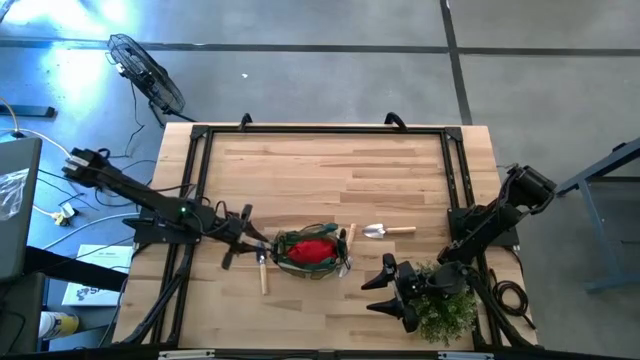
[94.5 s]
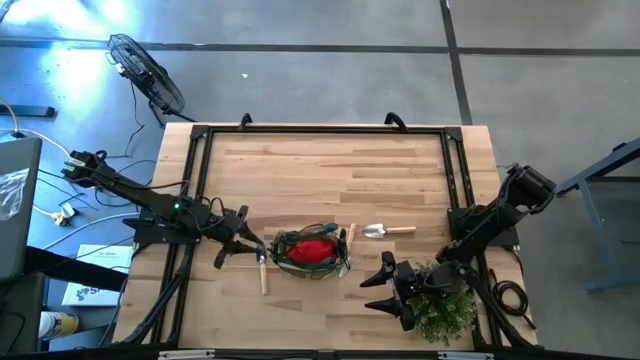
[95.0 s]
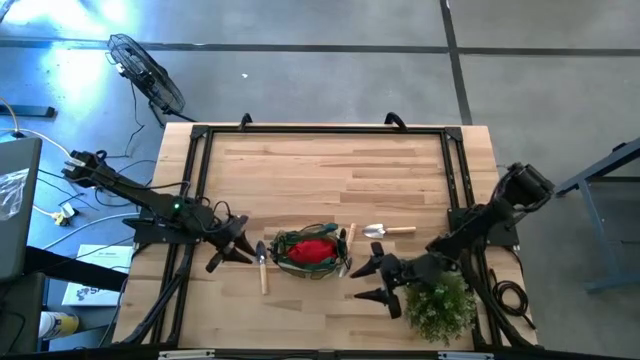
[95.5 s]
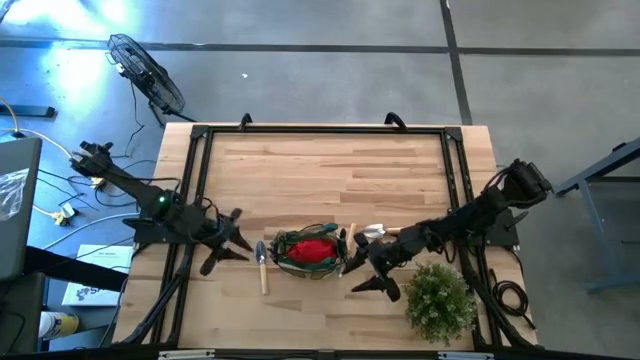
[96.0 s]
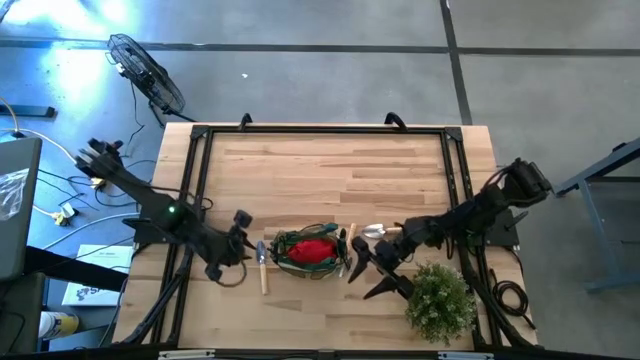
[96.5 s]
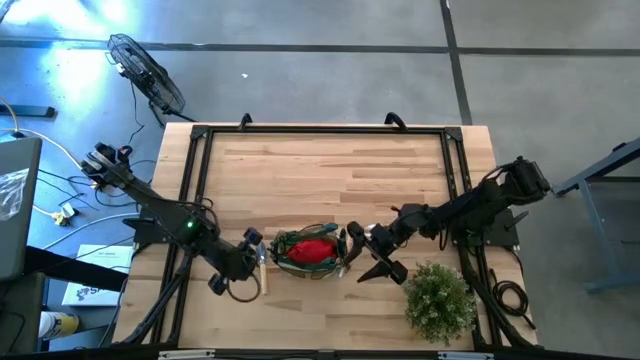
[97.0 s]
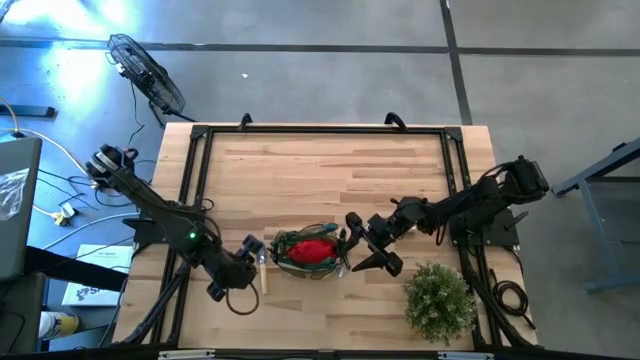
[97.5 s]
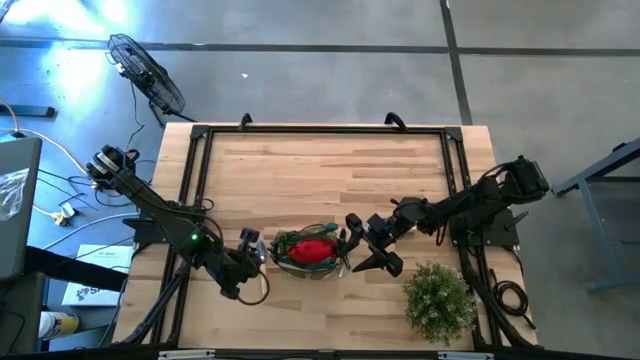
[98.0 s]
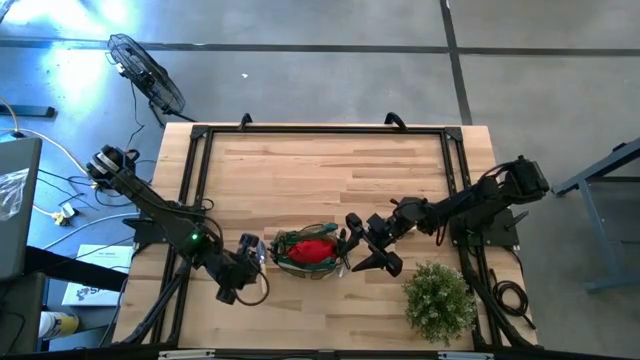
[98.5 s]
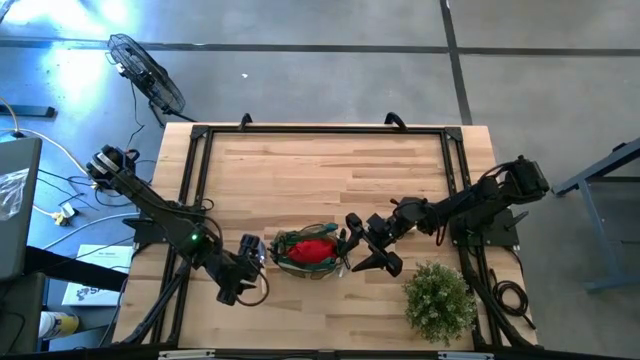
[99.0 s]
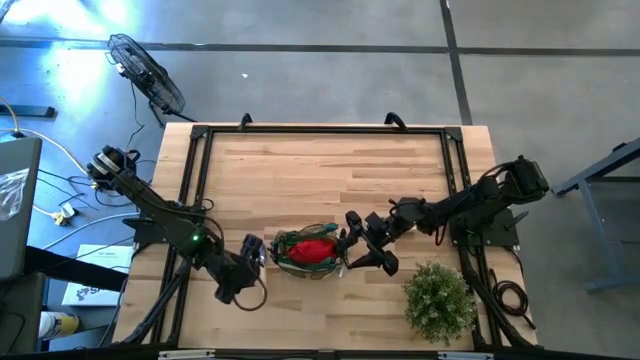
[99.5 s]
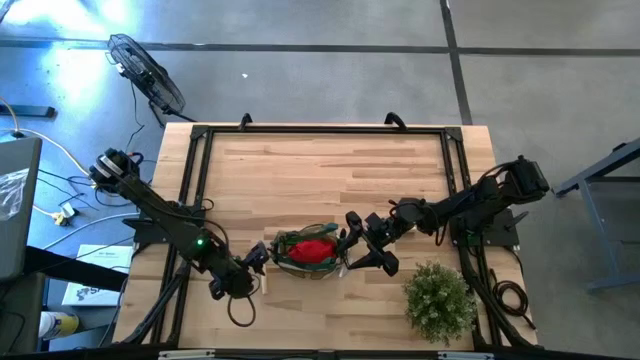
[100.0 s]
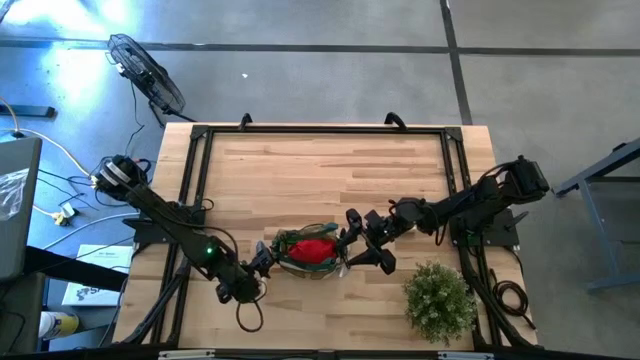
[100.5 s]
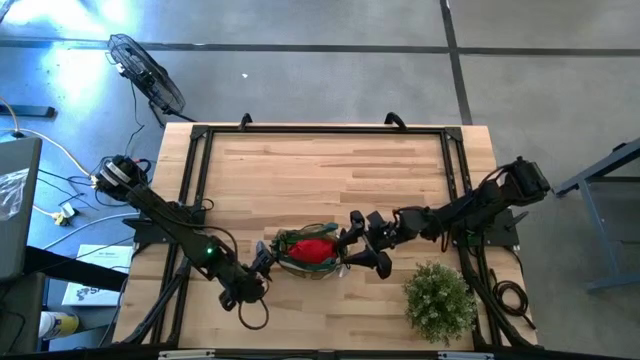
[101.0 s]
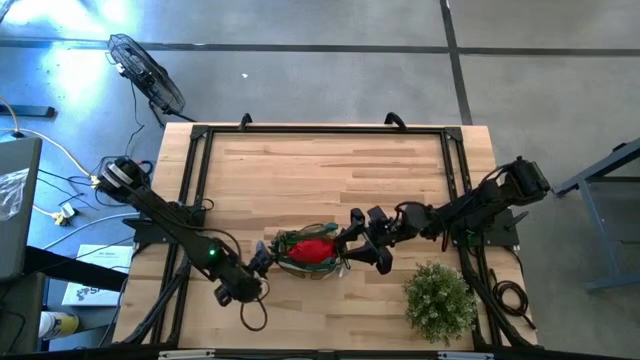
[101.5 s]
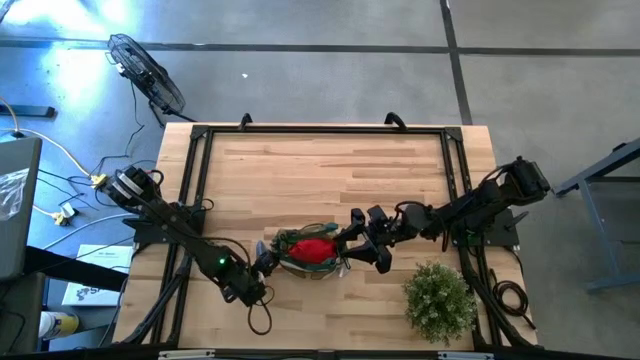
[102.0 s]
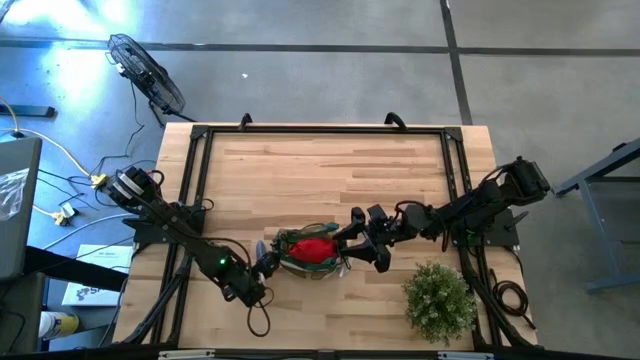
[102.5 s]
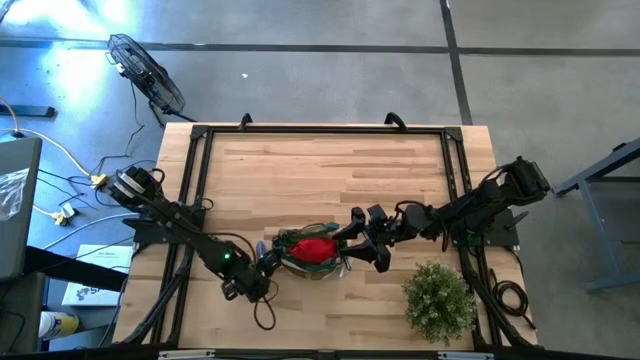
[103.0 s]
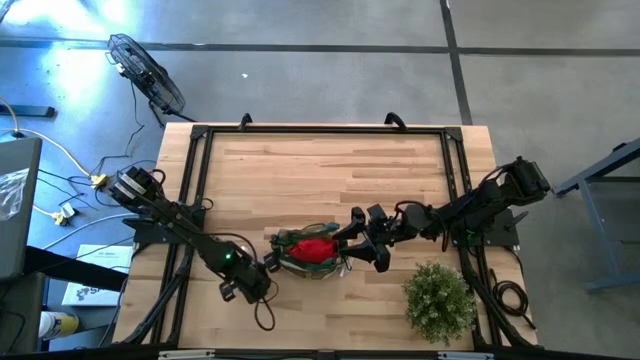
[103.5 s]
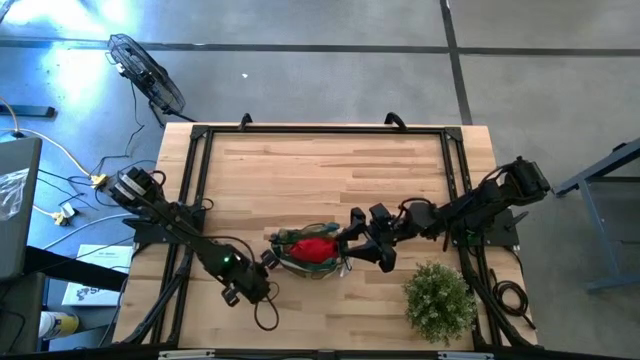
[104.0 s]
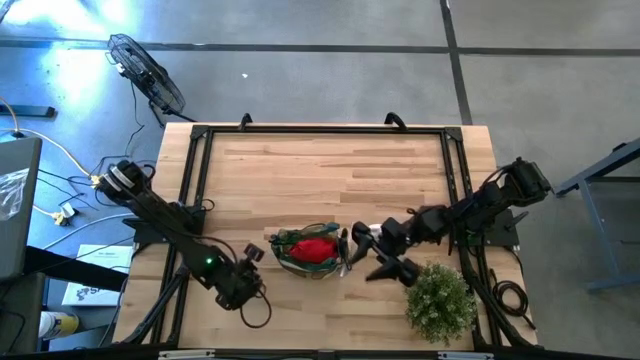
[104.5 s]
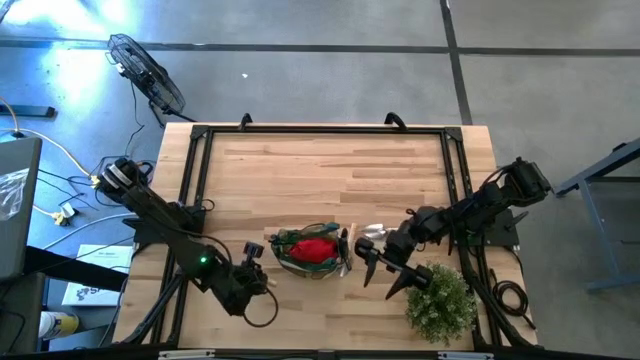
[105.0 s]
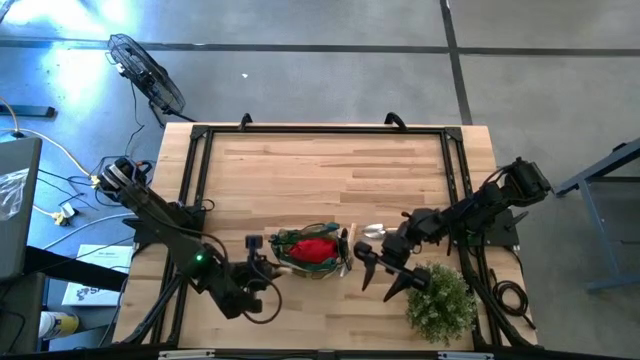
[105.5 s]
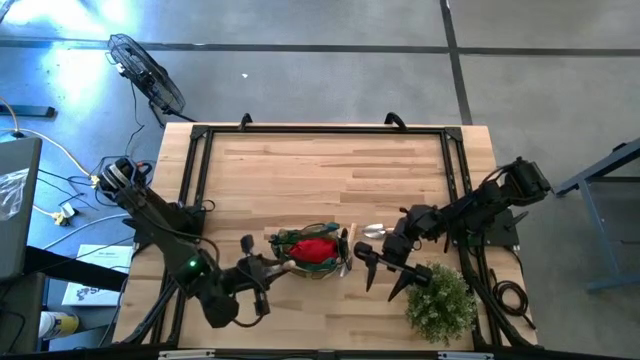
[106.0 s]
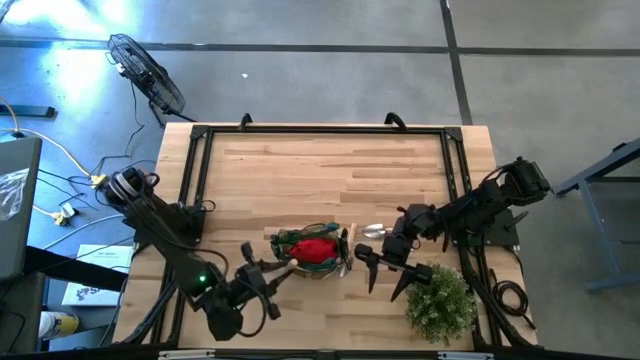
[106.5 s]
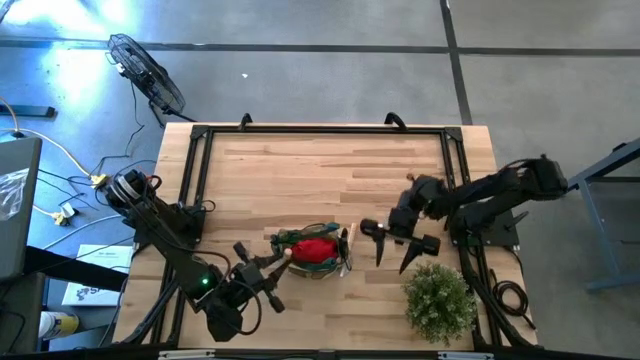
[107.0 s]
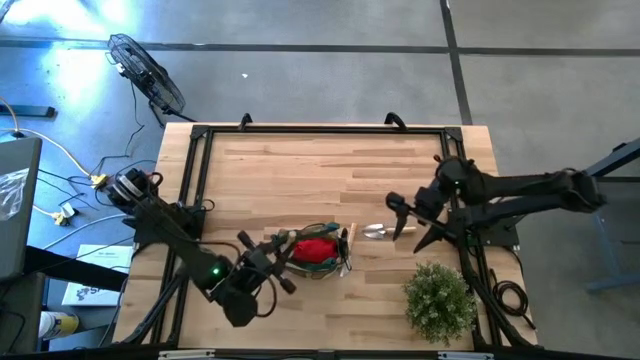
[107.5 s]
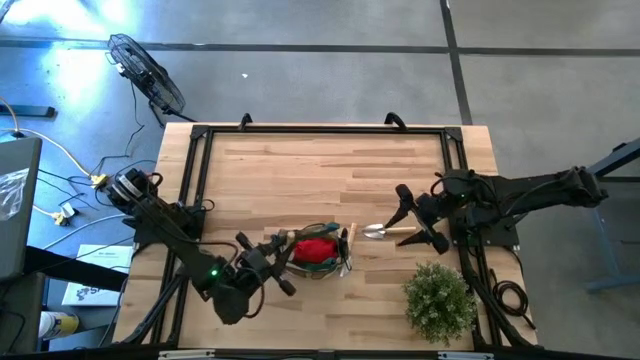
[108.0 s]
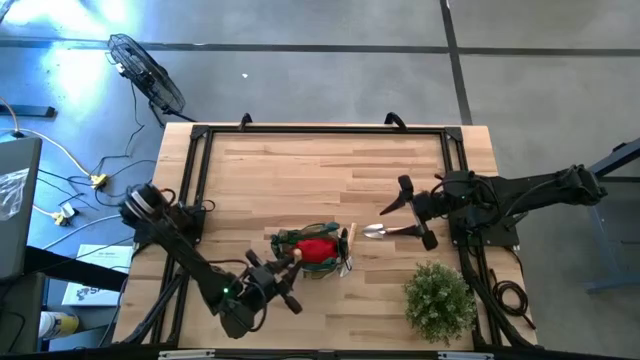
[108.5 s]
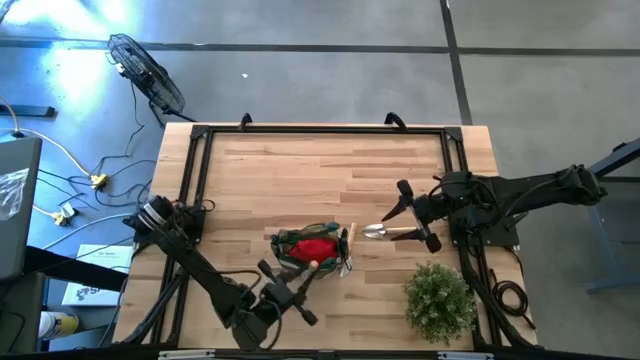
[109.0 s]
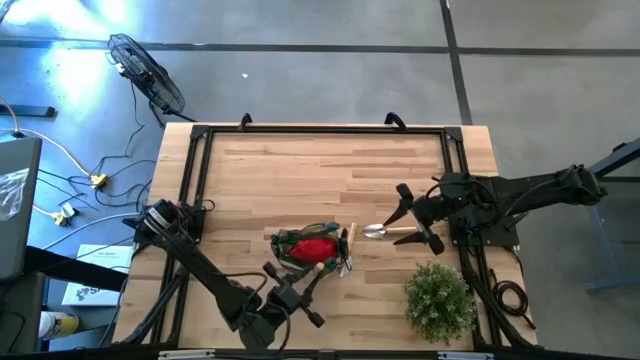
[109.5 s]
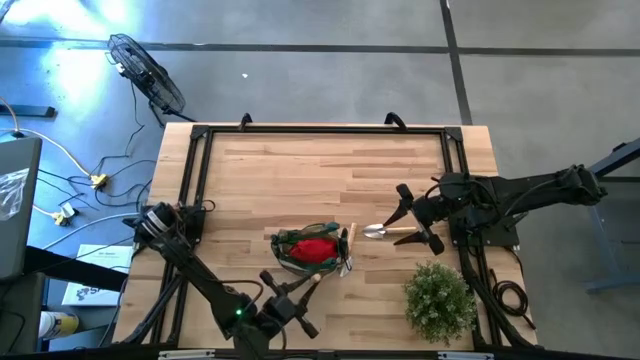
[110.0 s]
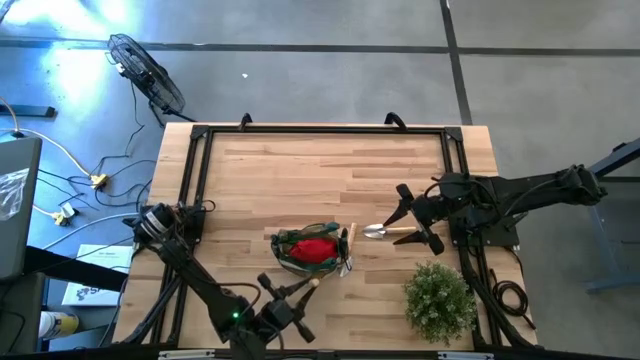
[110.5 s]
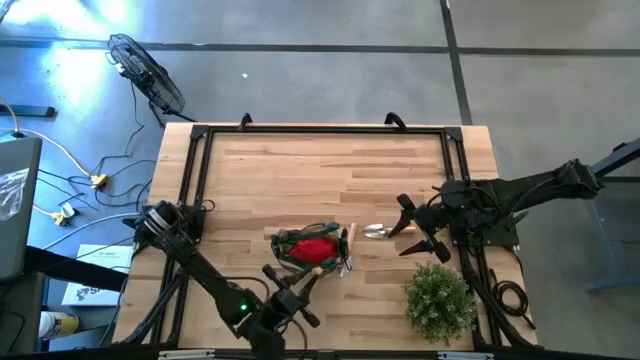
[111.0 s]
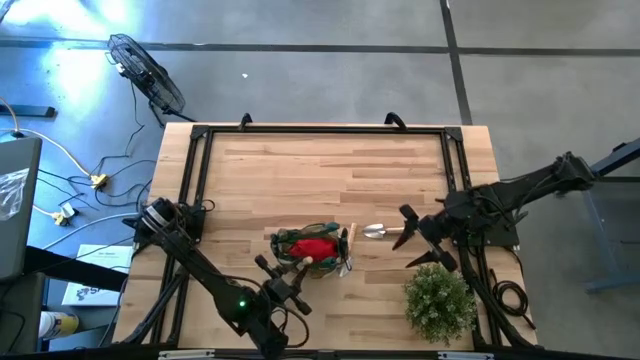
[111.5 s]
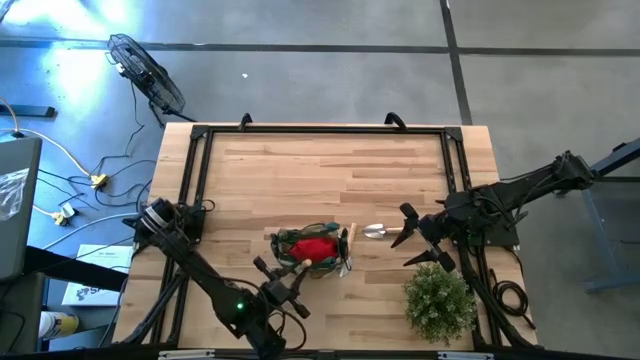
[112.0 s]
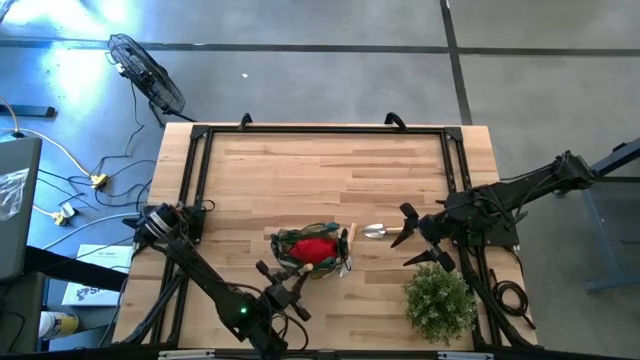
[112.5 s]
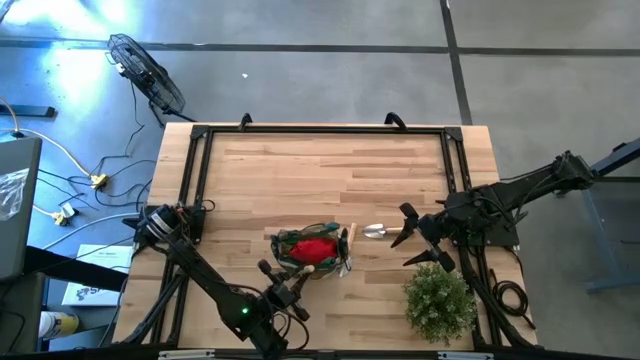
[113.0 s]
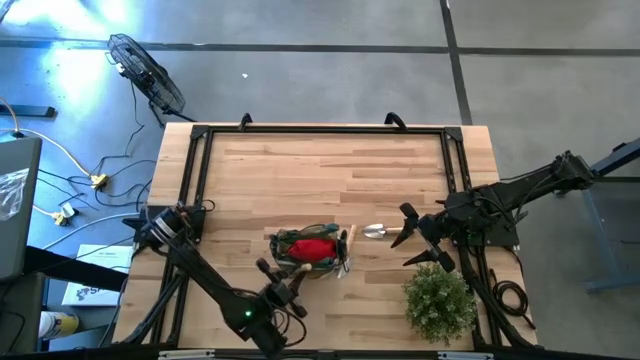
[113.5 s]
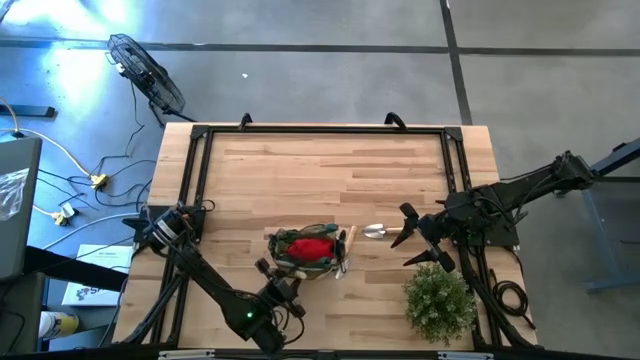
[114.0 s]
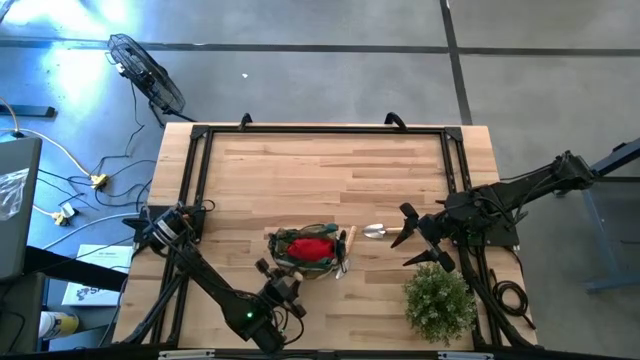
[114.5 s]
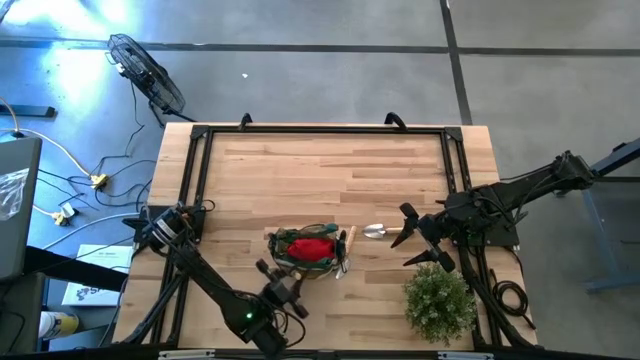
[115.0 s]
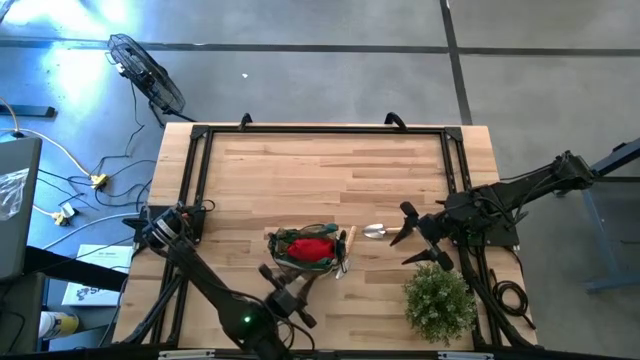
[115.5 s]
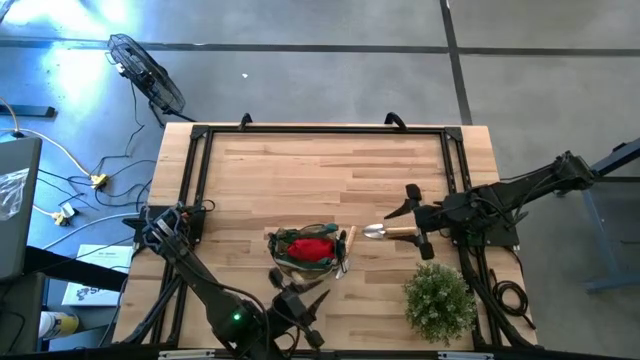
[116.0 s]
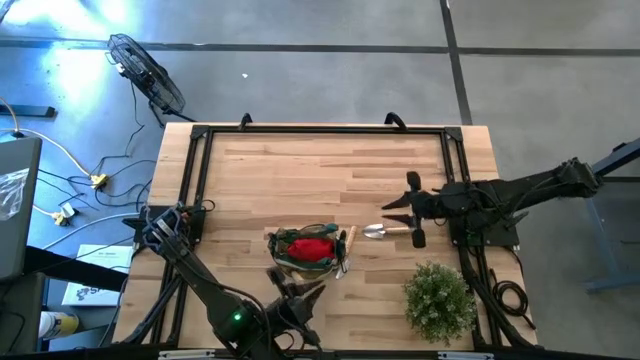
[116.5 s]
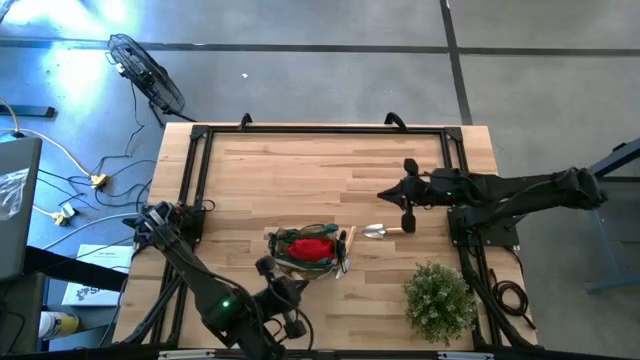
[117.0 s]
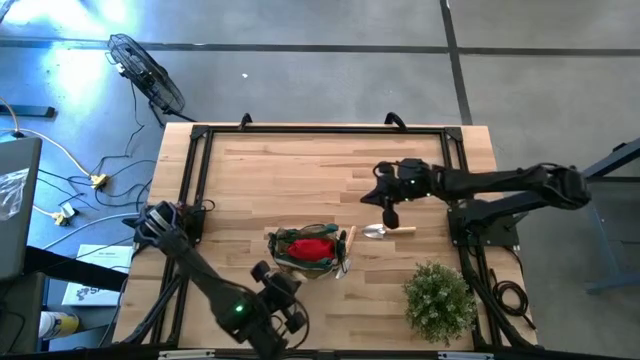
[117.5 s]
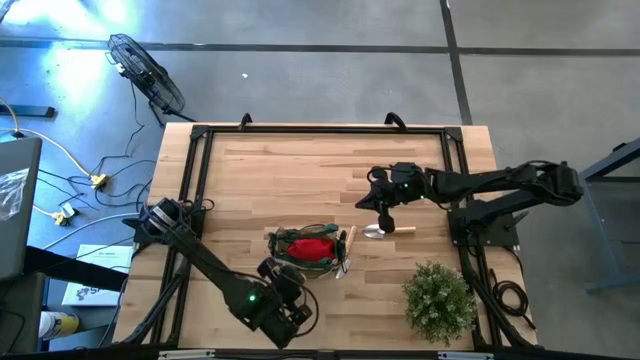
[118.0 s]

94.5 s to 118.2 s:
Task: Pick & Place Garden tools in Gardening bag
Put the left brown trowel into the green gardening bag
